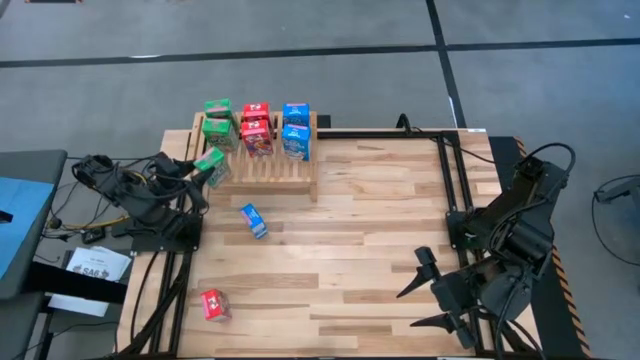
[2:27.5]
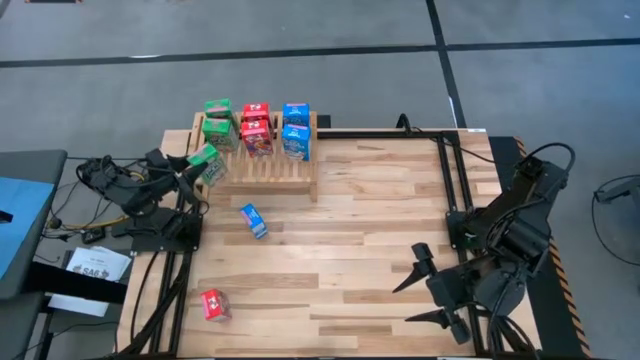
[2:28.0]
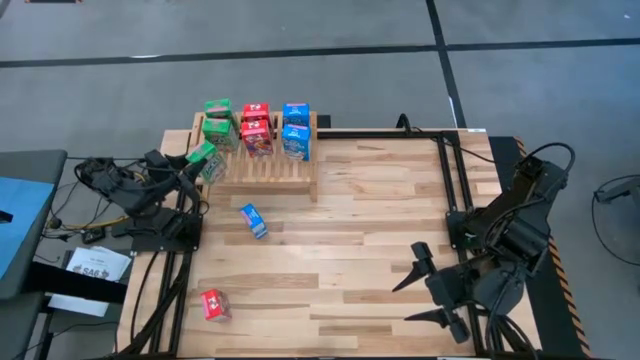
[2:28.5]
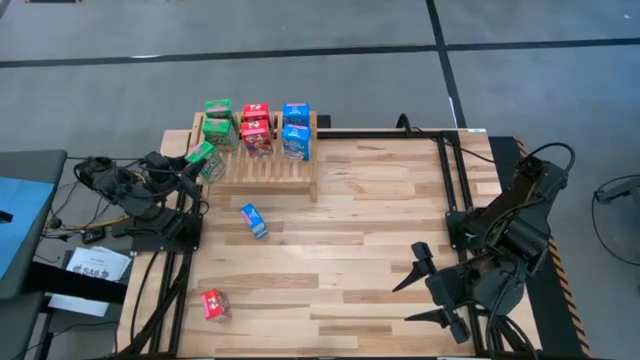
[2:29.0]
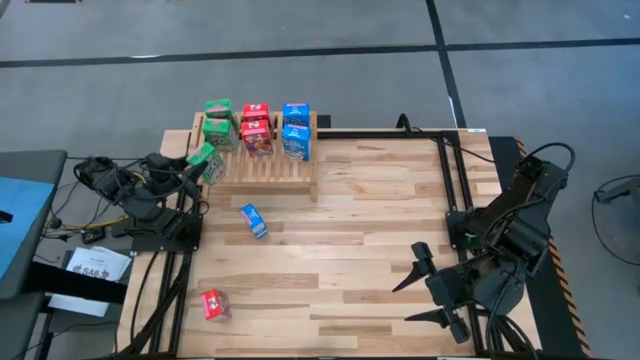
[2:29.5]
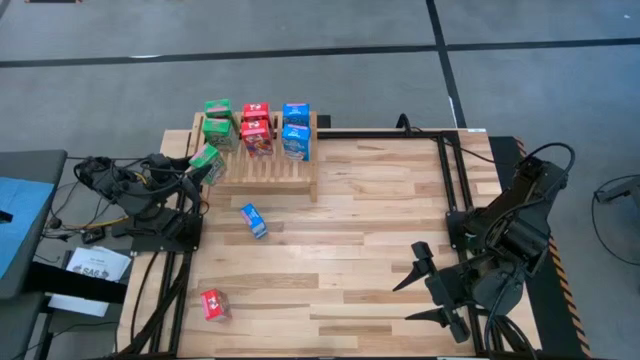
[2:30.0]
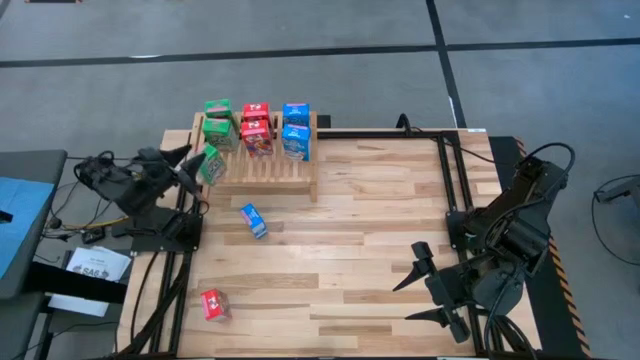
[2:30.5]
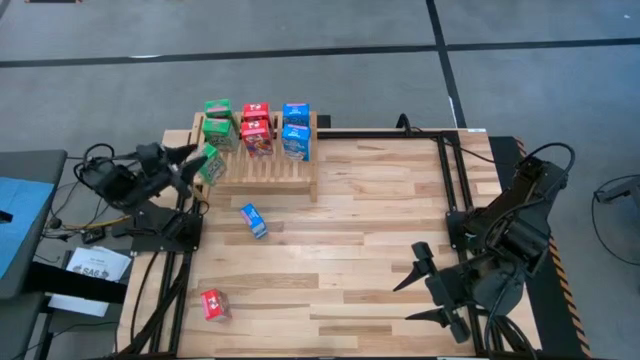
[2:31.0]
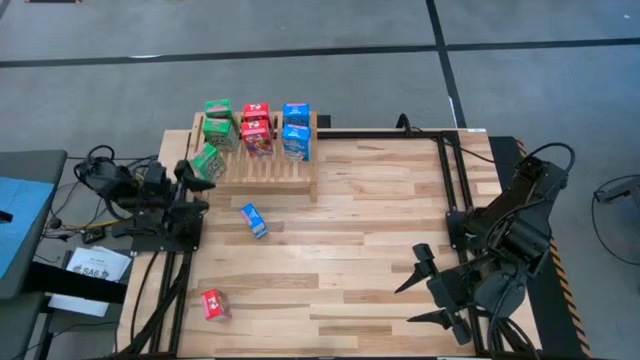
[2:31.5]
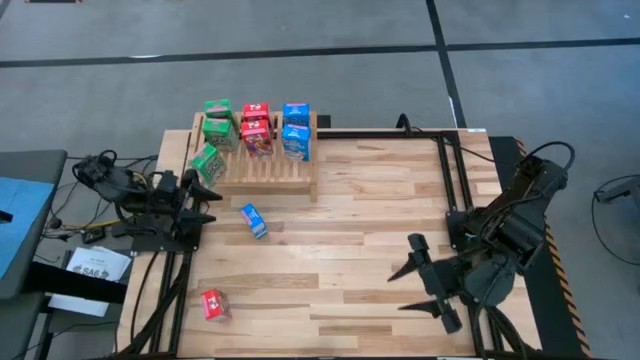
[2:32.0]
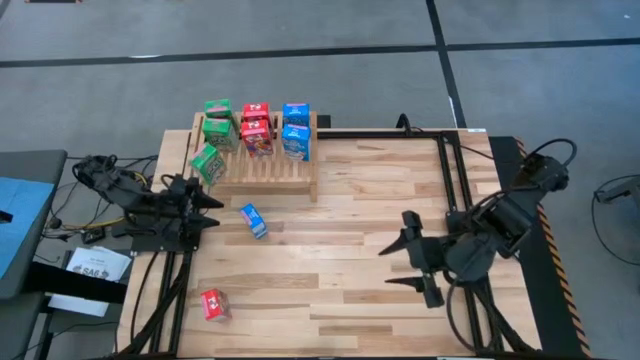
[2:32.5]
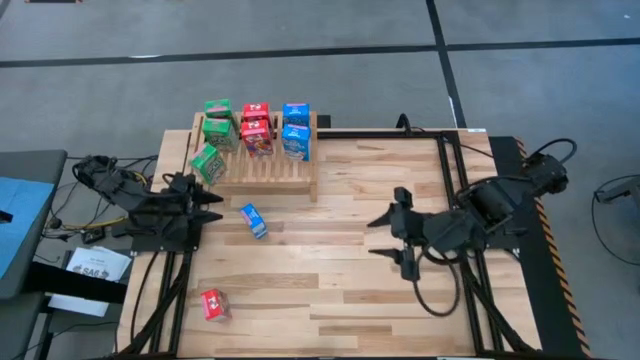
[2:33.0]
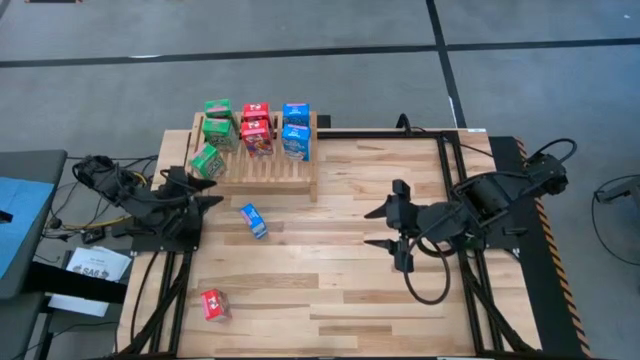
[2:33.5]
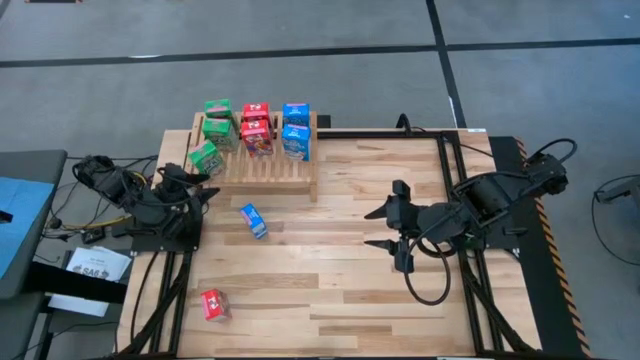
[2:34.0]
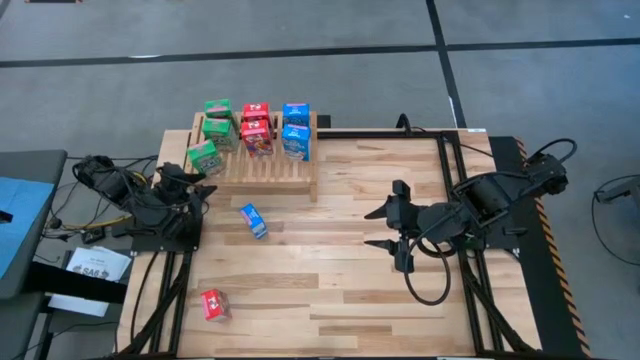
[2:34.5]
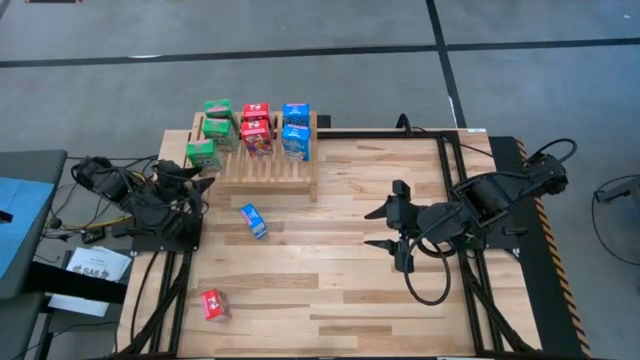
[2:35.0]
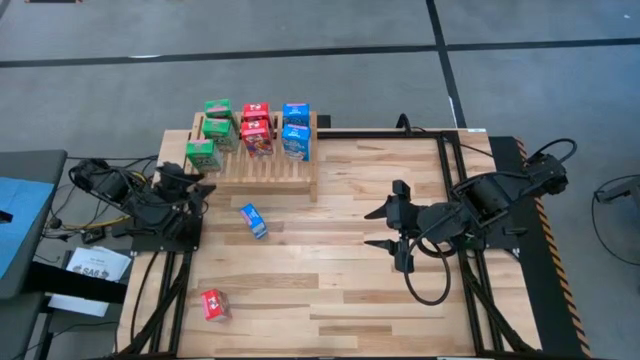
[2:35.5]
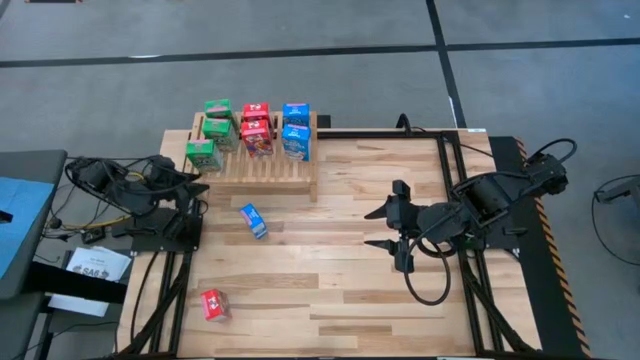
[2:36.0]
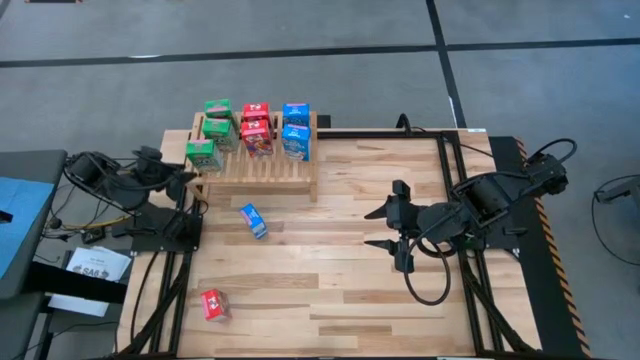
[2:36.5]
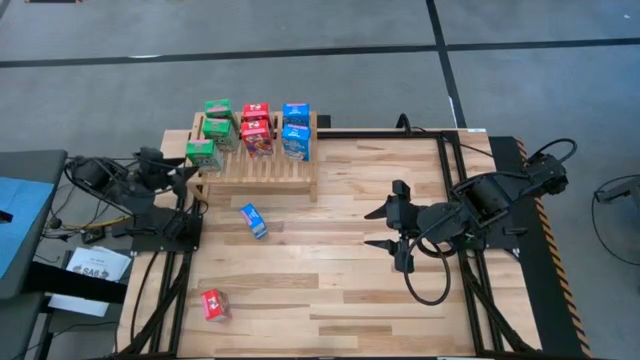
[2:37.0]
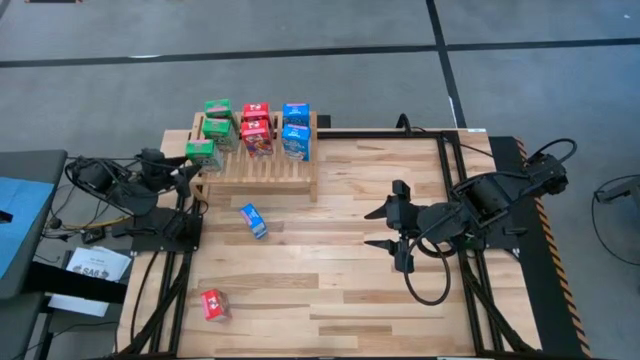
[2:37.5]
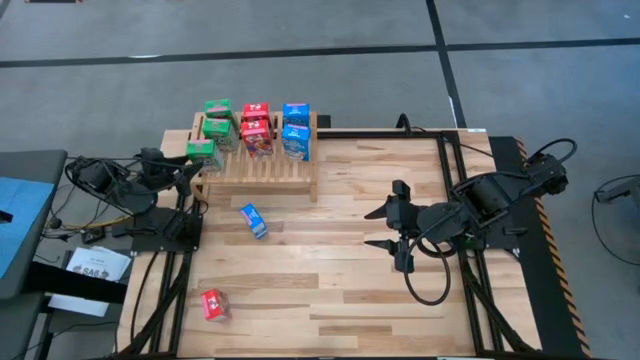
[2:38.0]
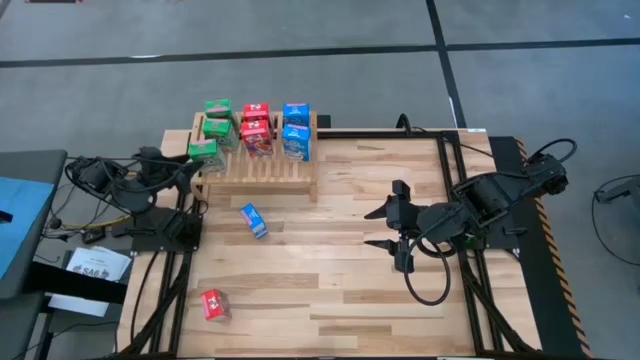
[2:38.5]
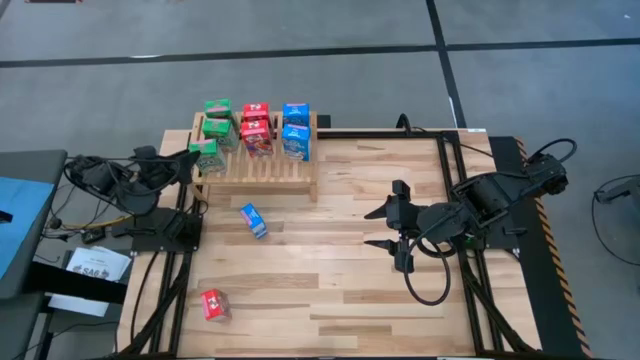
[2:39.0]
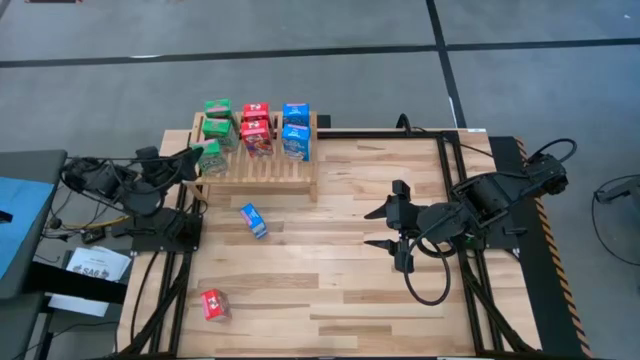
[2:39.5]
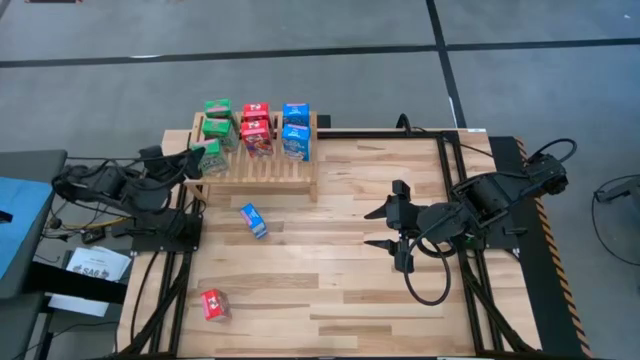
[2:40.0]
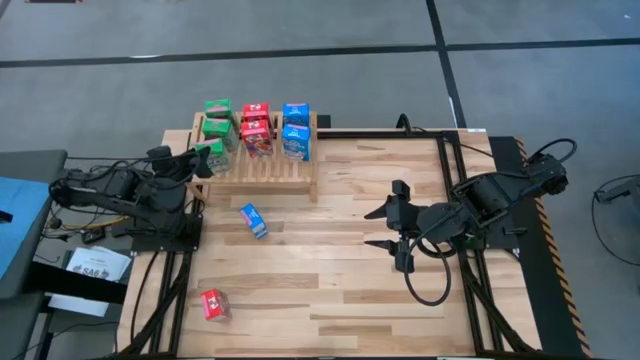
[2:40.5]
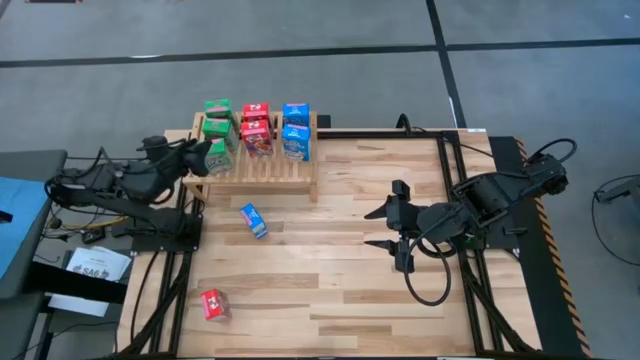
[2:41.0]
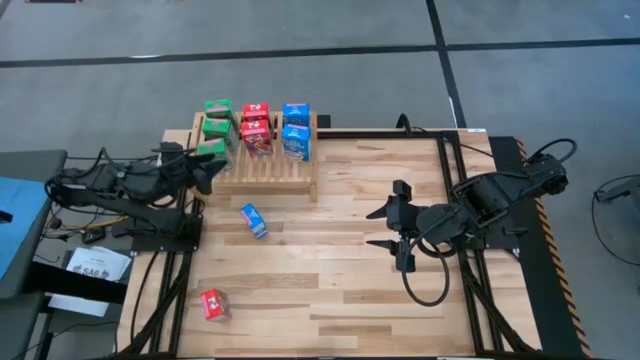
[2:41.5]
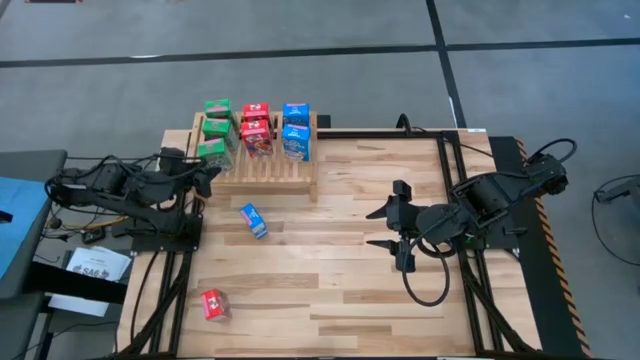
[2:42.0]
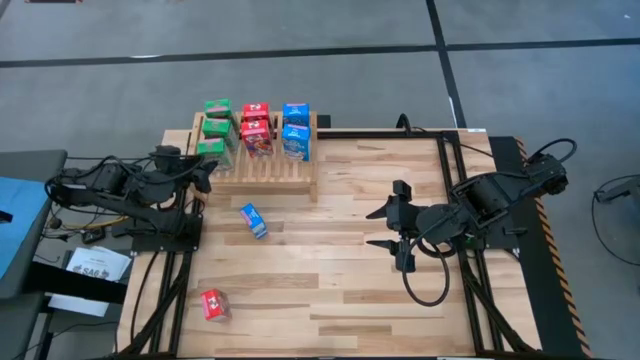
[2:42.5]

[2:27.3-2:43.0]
Task: Stack cereal on shelf
Put the green cereal box on the shelf aligned with the other green cereal box

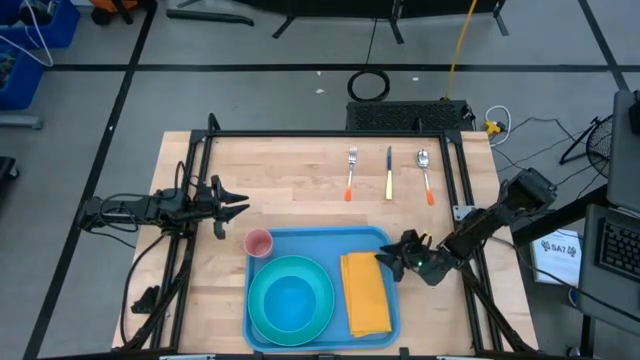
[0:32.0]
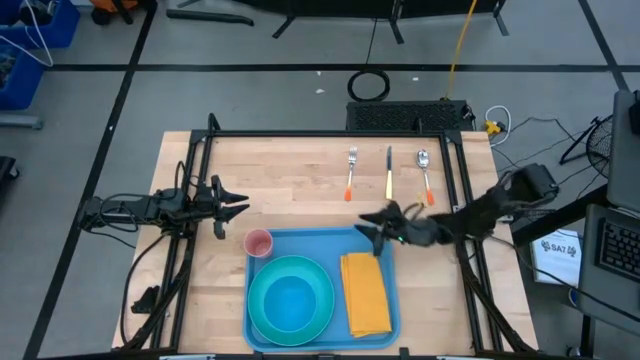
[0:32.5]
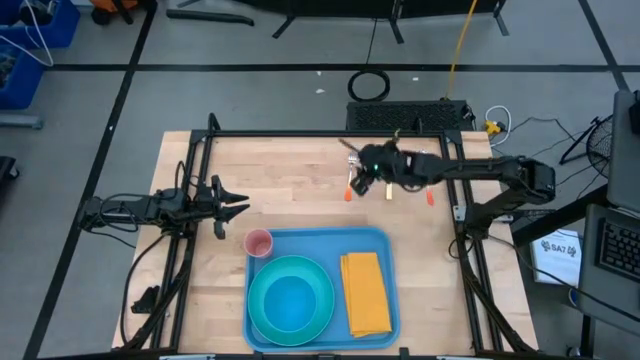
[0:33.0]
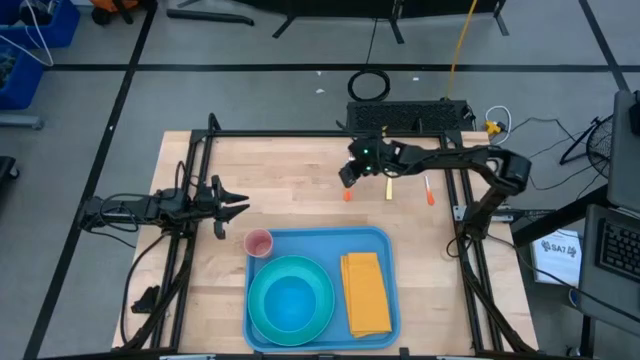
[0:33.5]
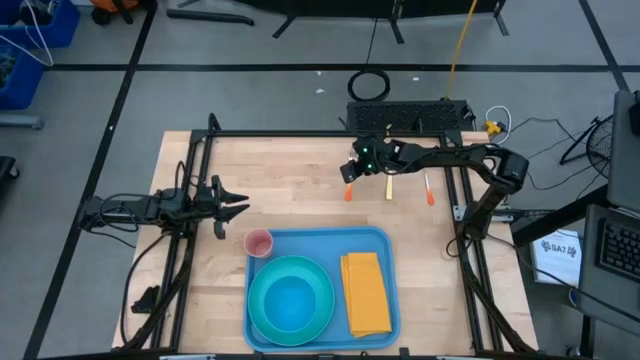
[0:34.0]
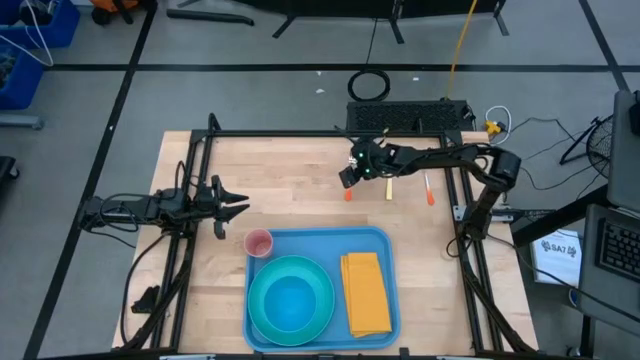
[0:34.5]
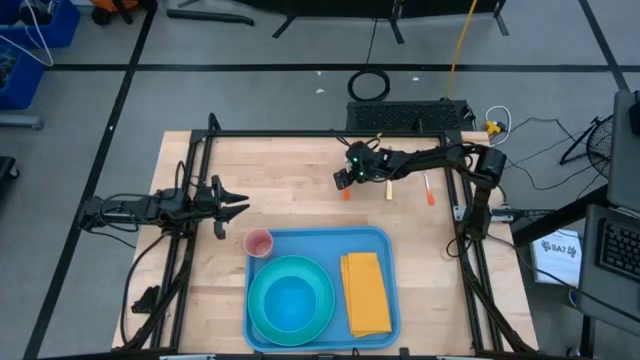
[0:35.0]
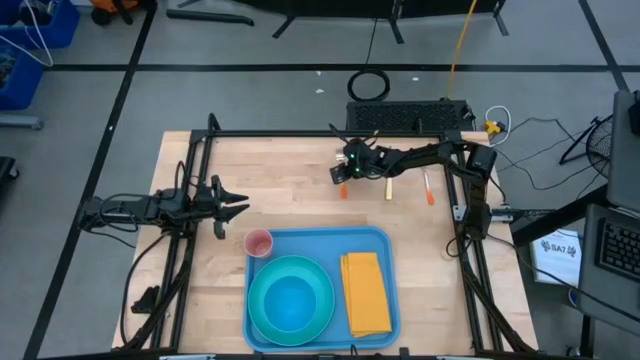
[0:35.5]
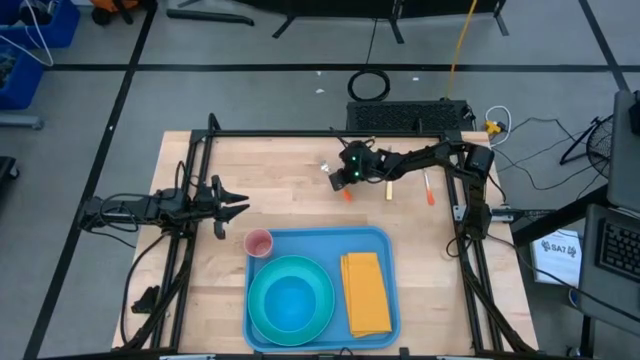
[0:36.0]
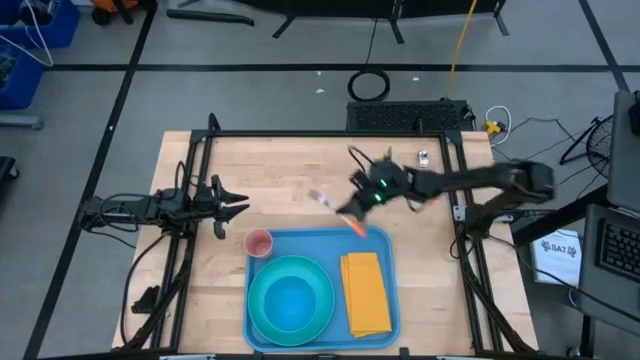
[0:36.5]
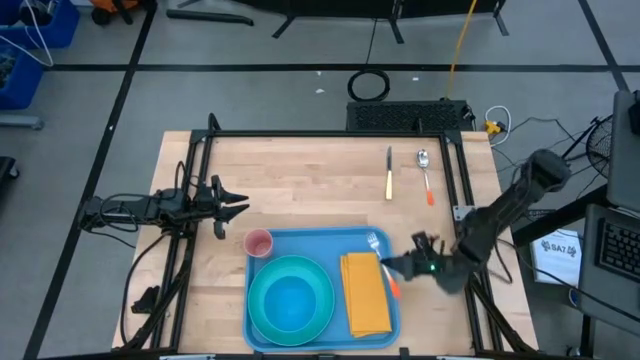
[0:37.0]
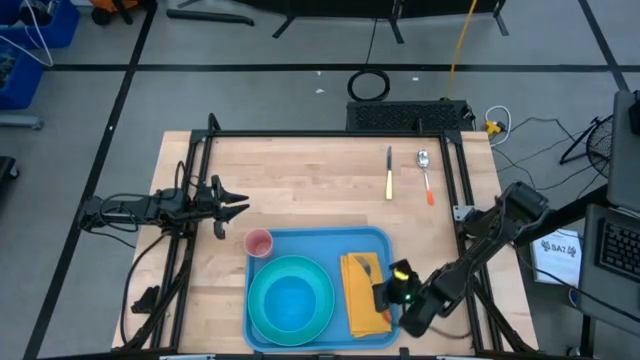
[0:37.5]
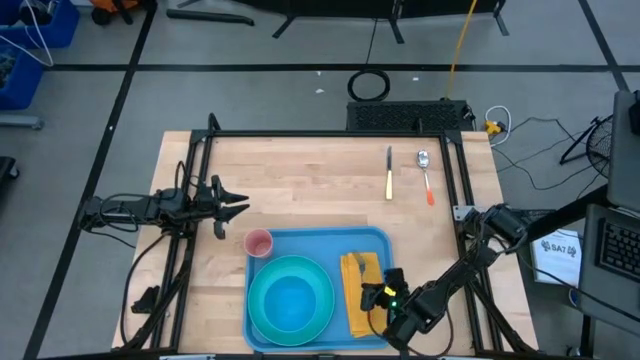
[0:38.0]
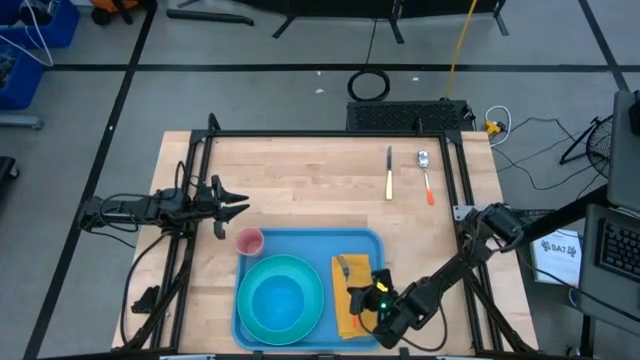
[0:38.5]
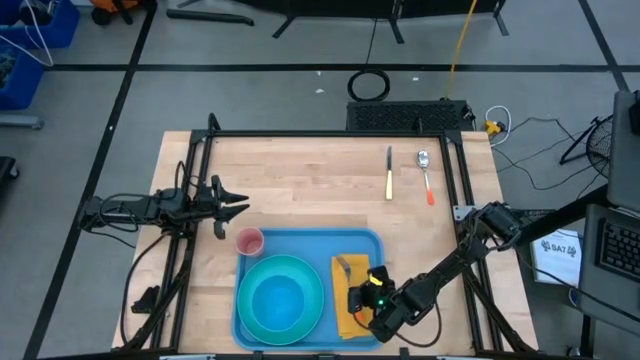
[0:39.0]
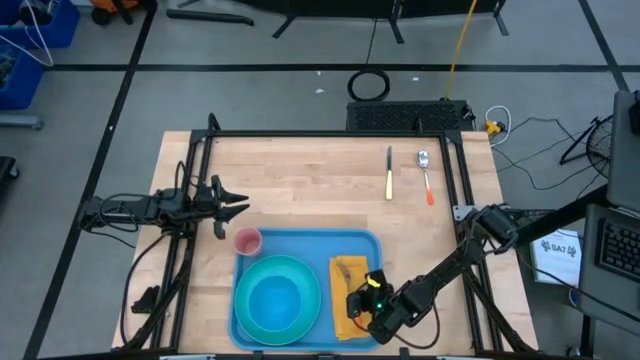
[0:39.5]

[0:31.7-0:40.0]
Task: Set up tray
Put the orange fork on top of the yellow napkin
